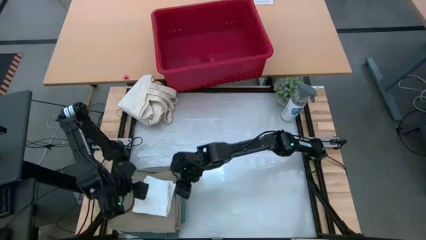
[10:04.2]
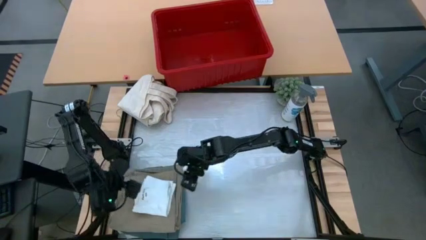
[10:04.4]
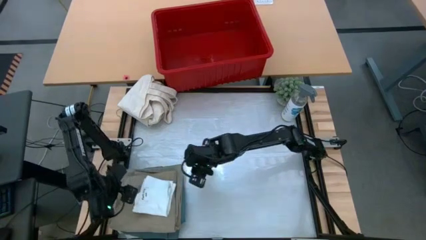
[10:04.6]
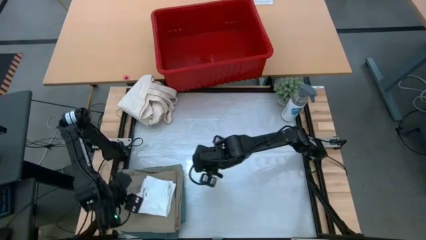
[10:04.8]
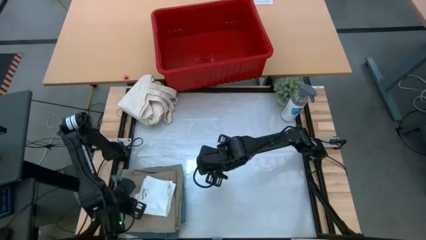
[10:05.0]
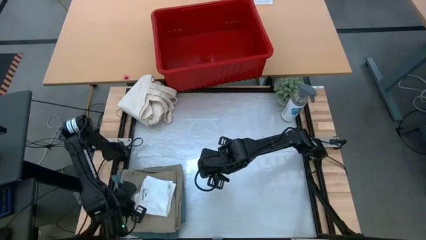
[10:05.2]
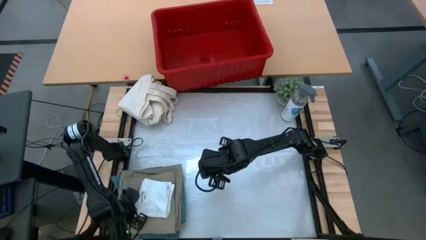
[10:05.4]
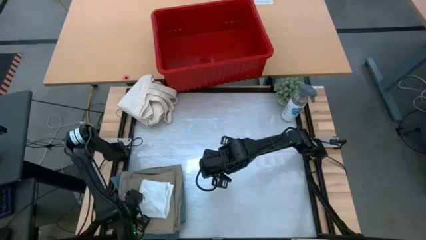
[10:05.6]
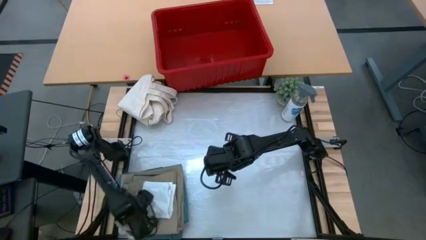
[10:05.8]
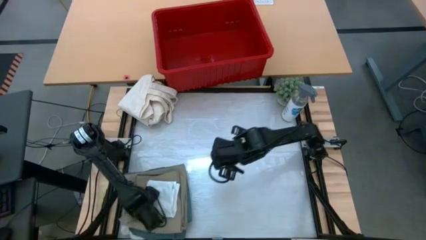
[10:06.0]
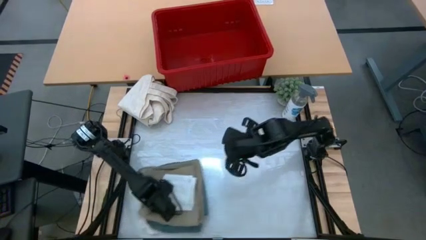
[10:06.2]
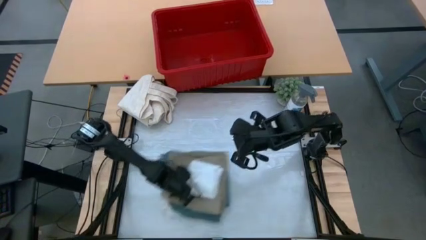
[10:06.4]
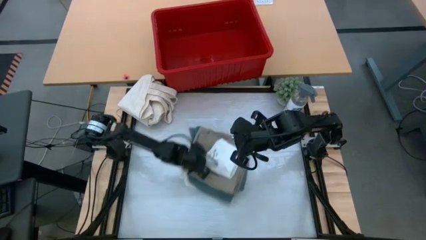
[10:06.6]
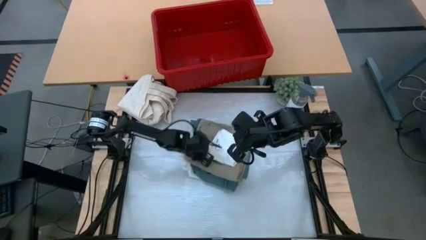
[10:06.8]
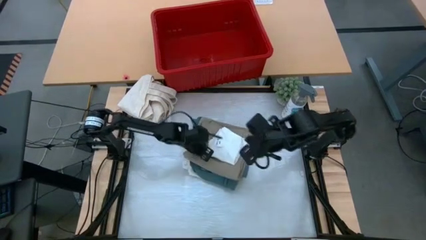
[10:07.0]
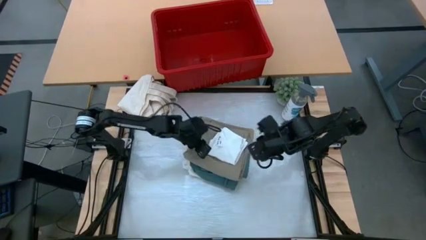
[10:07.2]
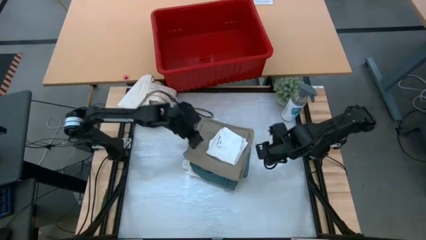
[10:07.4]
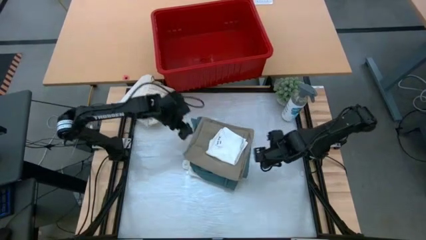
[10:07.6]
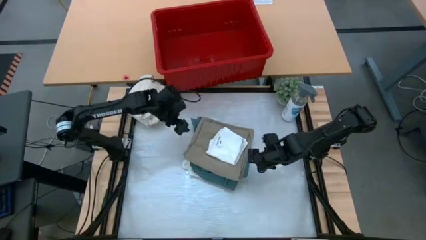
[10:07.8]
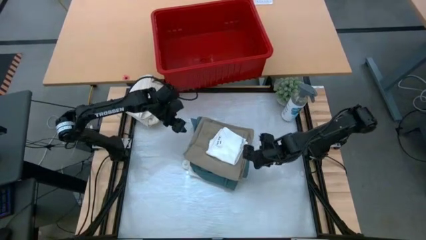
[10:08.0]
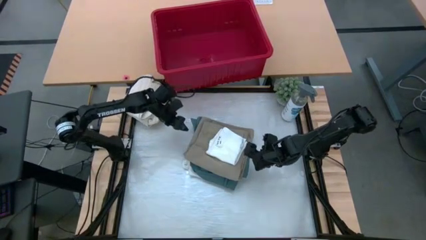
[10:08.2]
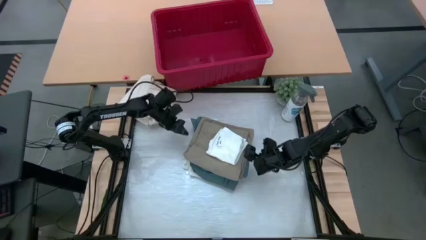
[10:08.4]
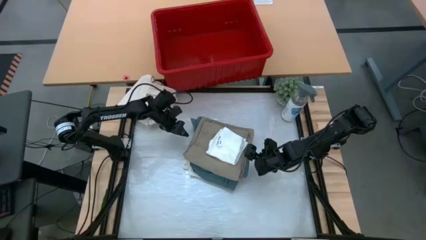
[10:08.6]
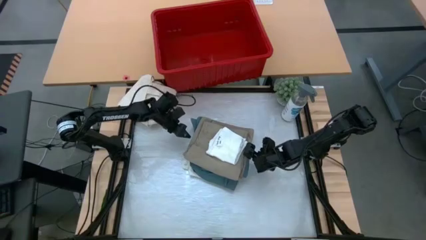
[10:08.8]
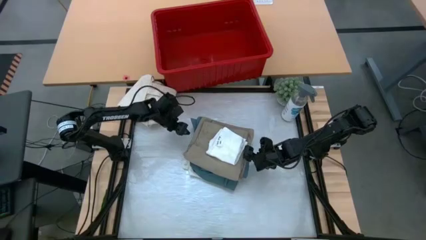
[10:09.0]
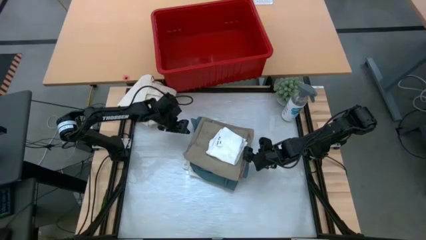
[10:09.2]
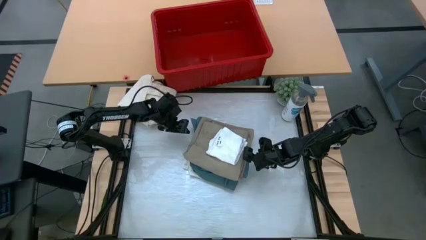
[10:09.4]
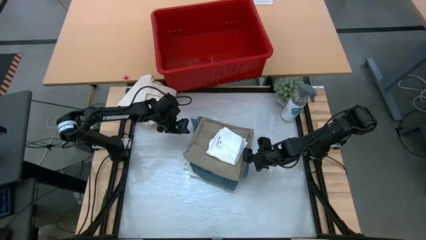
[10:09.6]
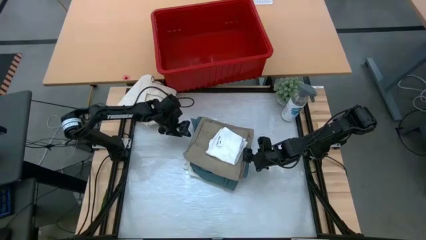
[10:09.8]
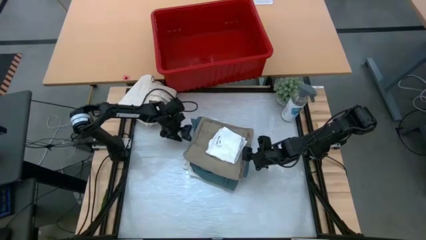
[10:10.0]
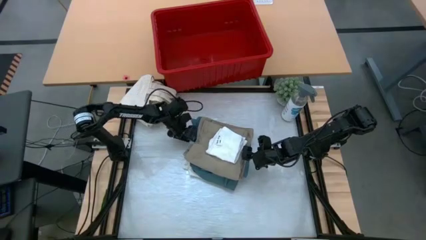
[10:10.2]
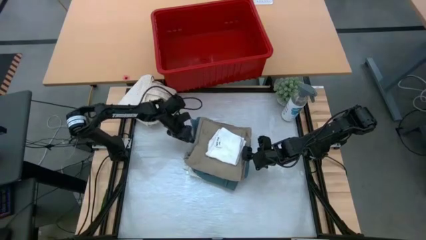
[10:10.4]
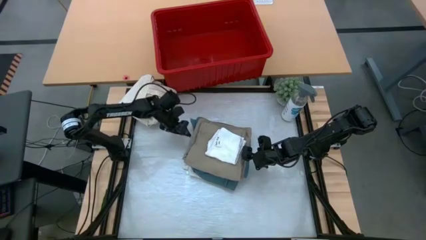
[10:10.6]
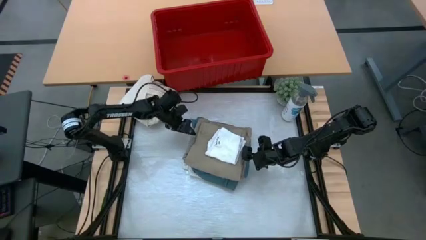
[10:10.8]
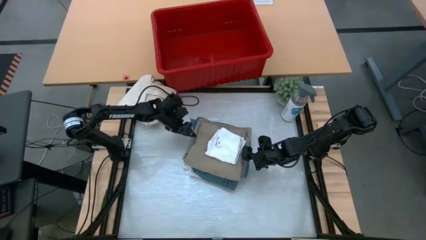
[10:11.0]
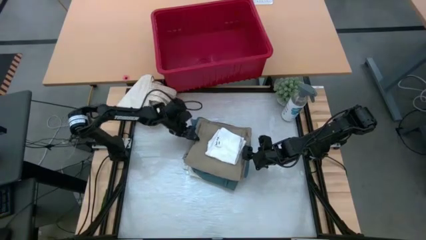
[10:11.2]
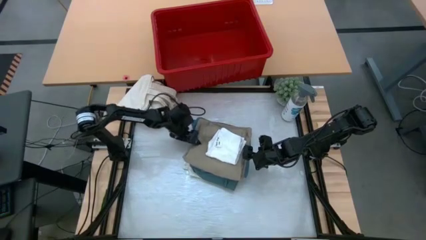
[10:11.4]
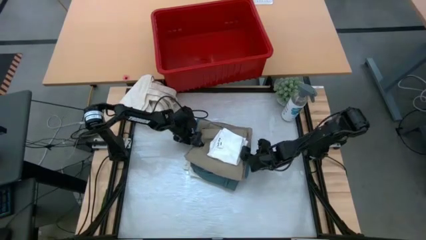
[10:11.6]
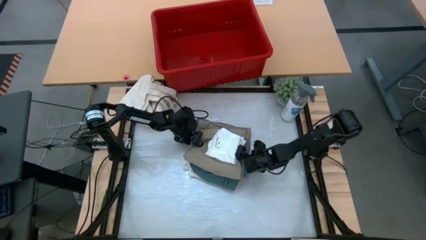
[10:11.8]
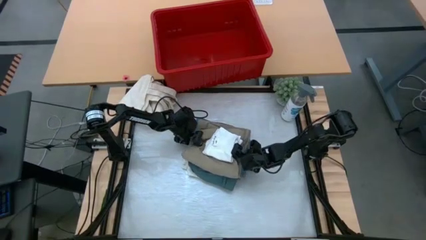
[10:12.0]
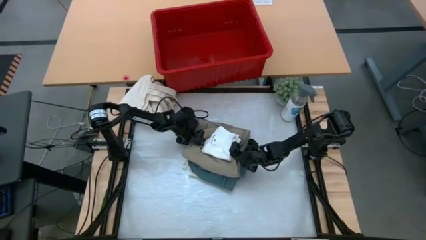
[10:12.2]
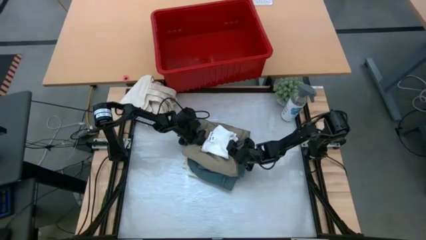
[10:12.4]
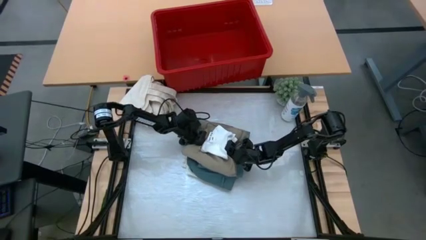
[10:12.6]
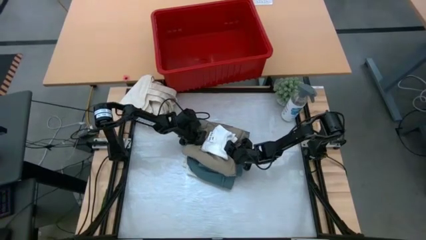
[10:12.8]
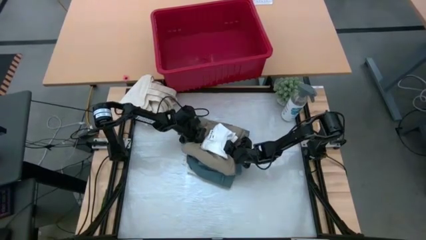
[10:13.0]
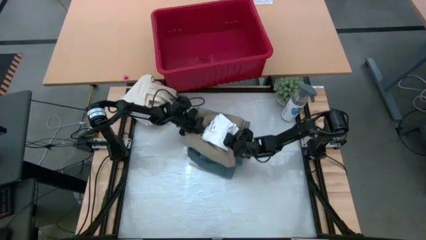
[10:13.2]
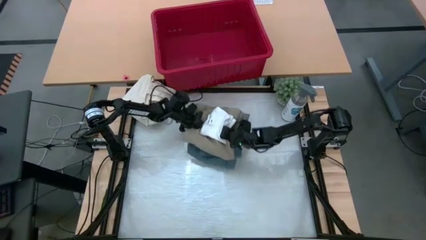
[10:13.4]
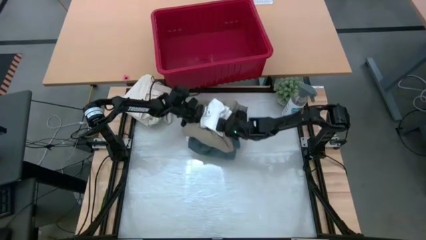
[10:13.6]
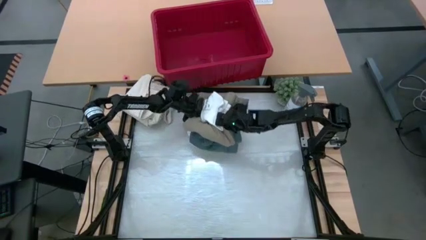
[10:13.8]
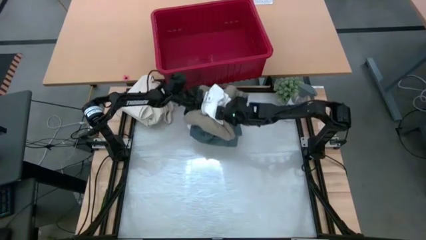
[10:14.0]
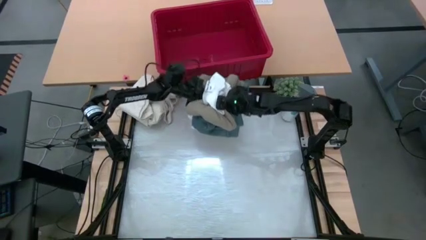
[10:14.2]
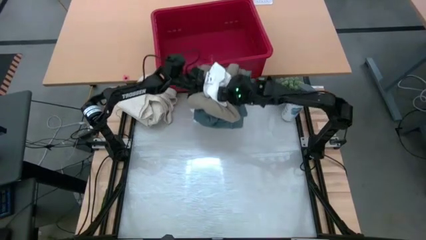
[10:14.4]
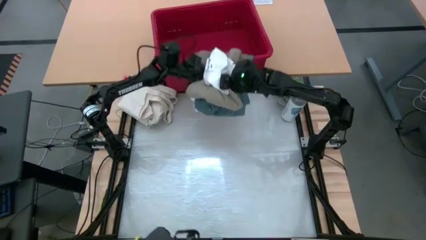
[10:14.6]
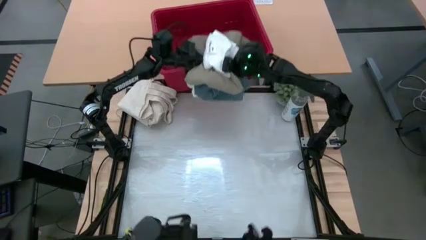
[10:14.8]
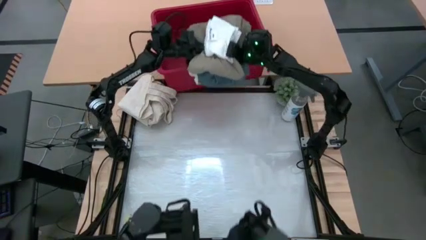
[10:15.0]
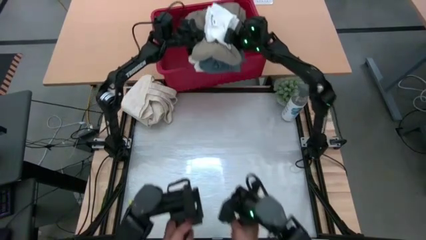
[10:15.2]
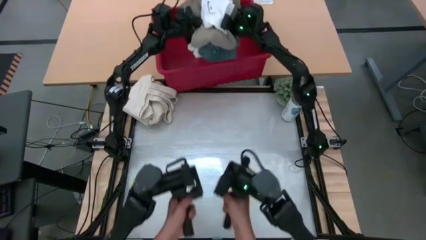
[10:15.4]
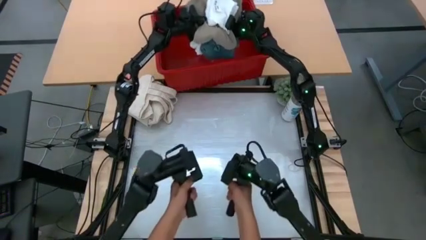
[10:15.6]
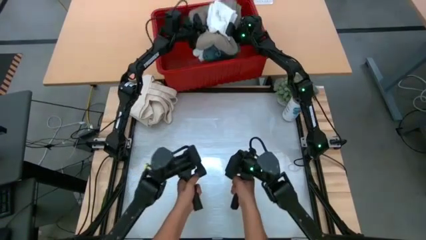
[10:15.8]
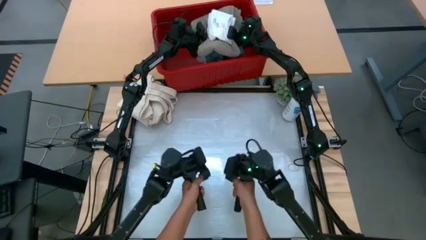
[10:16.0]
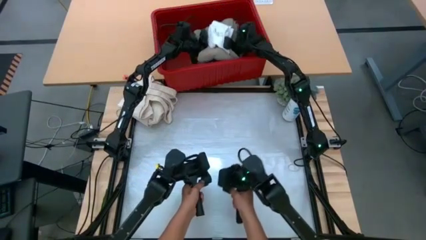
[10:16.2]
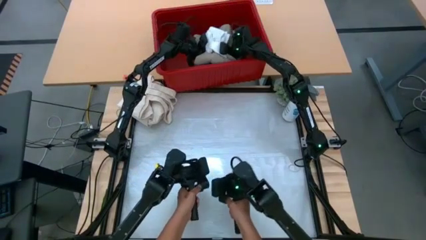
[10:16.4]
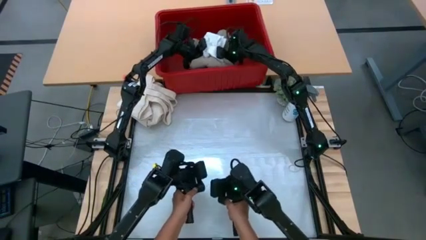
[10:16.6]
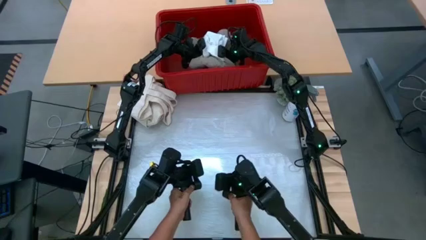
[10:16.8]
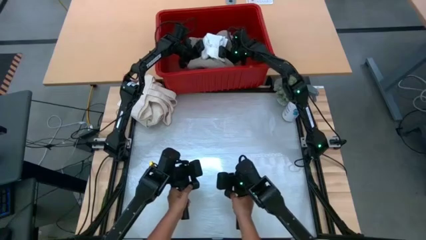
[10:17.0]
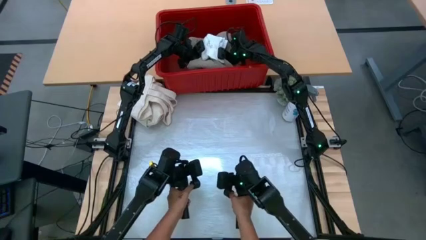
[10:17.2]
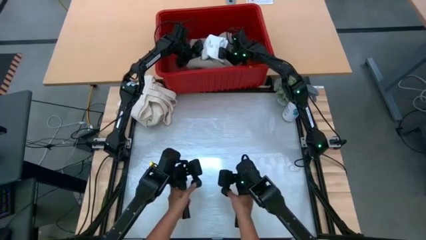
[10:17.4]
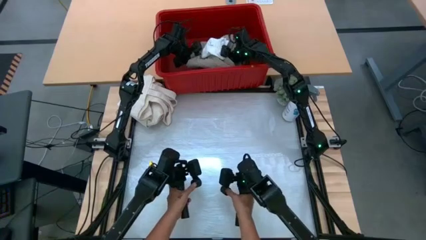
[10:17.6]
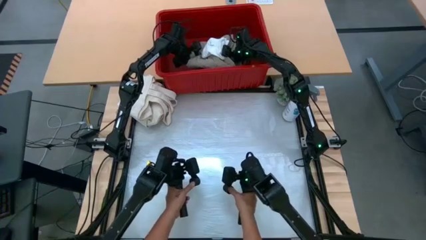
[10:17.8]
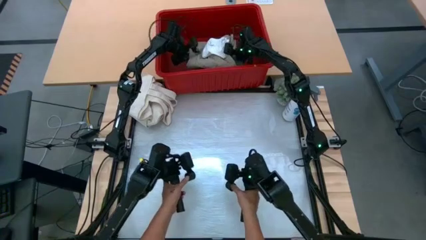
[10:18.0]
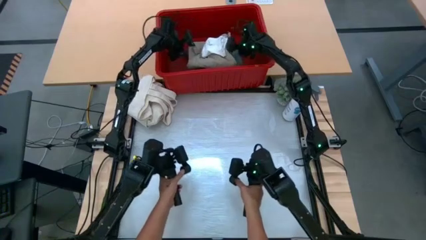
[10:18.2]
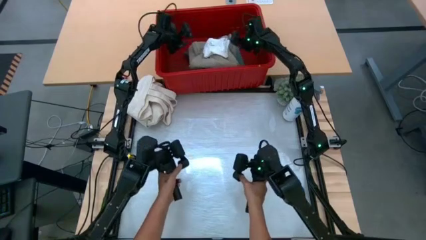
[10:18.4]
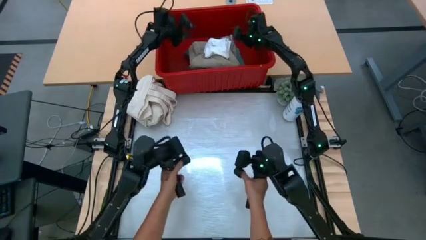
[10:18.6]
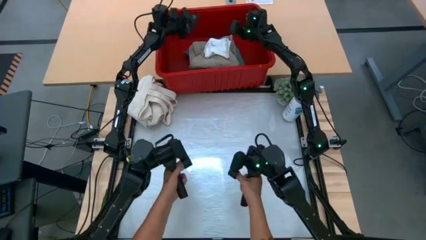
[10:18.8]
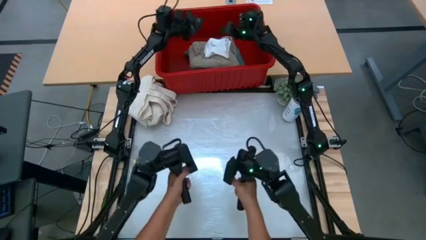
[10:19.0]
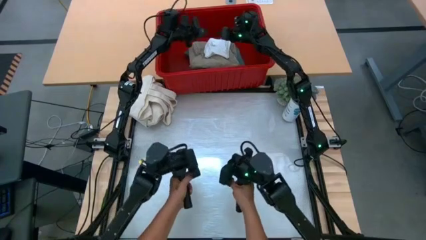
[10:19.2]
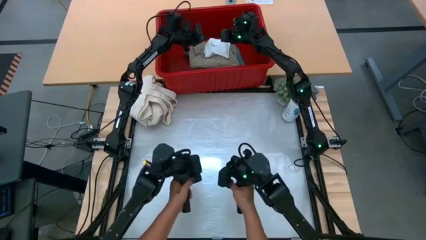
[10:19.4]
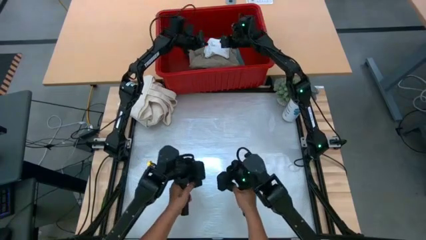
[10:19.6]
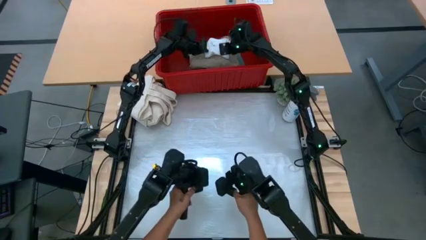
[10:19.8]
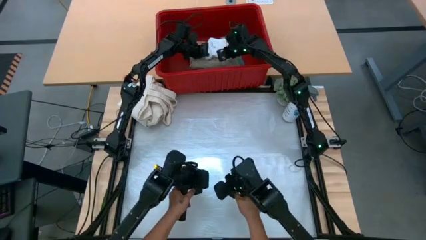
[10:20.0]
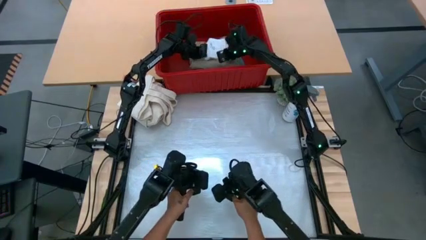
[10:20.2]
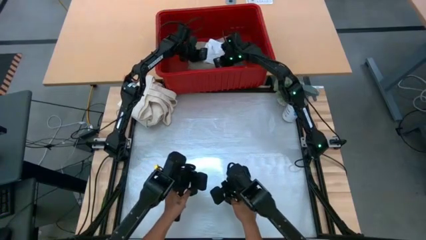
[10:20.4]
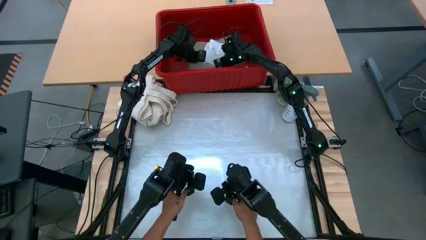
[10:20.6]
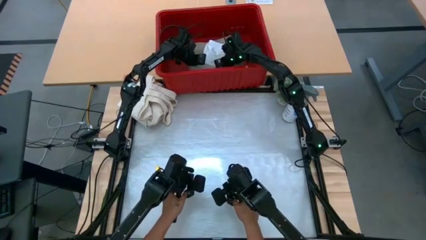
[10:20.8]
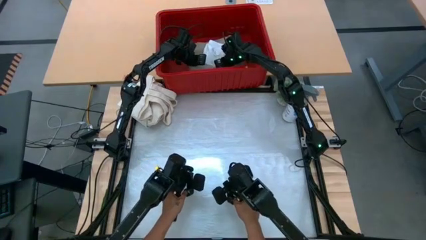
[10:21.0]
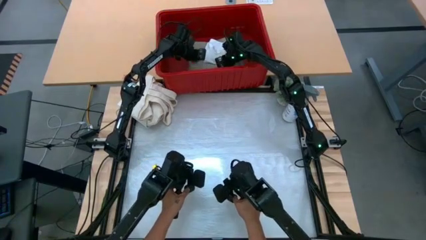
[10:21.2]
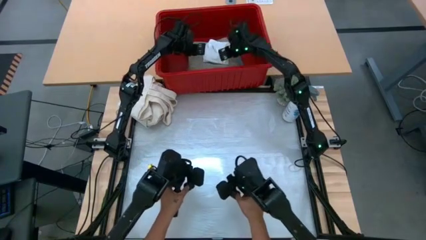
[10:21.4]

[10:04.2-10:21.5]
Task: Fold Laundry from Bin
Put the stack of folded clothes into the red organizer bin
